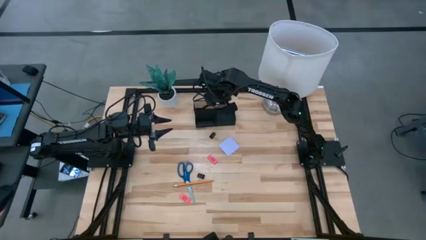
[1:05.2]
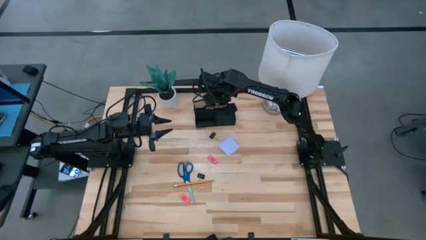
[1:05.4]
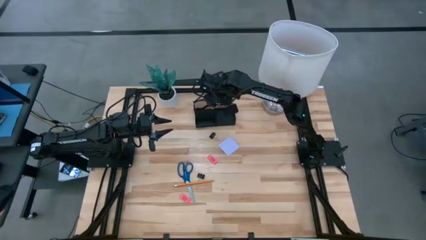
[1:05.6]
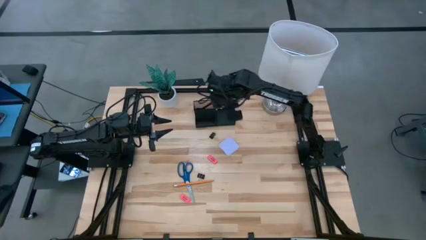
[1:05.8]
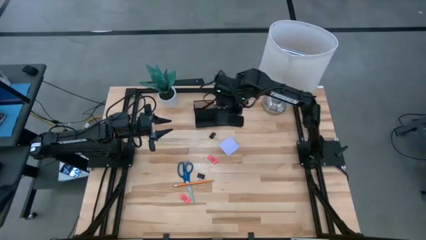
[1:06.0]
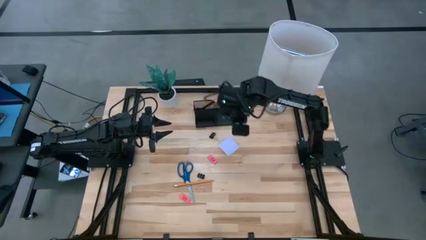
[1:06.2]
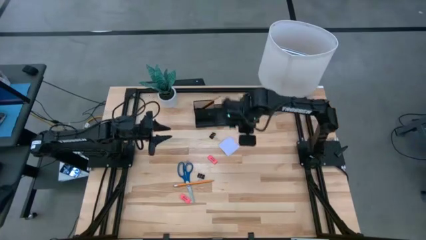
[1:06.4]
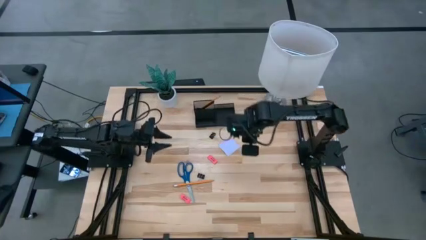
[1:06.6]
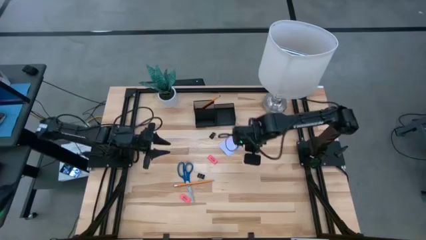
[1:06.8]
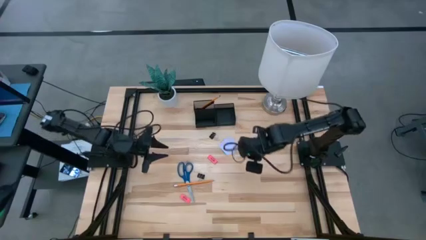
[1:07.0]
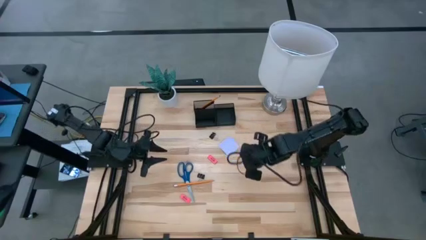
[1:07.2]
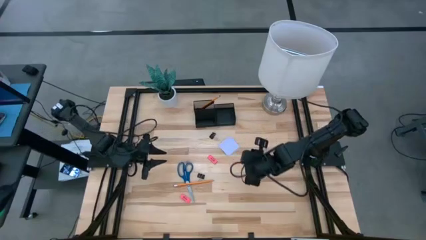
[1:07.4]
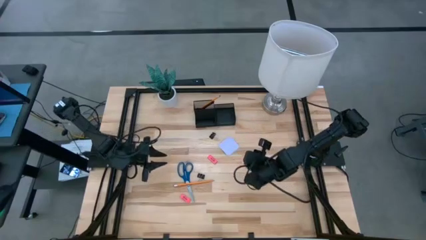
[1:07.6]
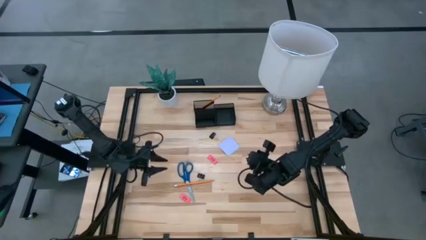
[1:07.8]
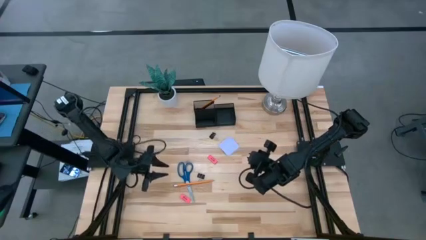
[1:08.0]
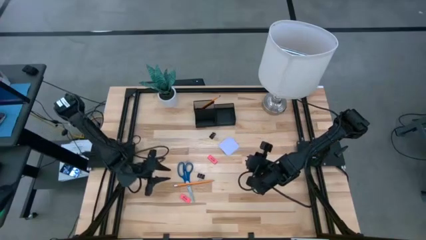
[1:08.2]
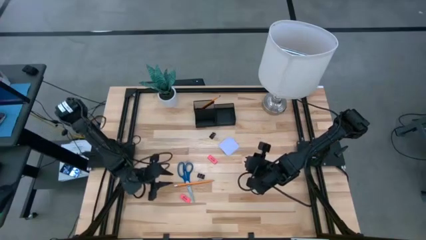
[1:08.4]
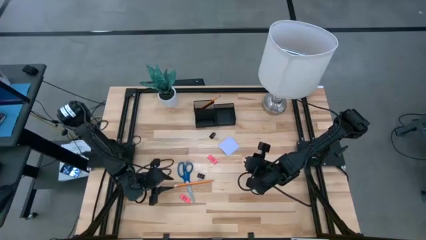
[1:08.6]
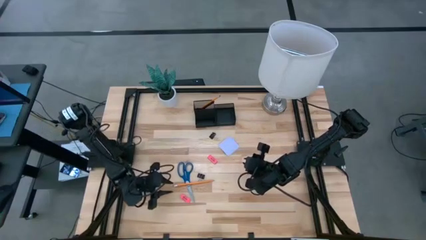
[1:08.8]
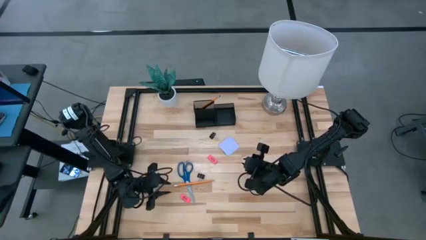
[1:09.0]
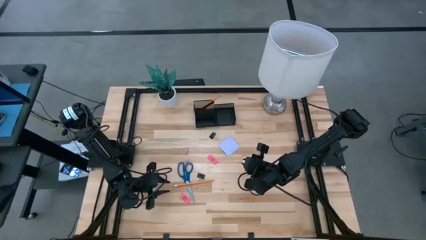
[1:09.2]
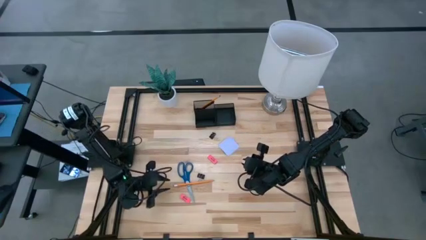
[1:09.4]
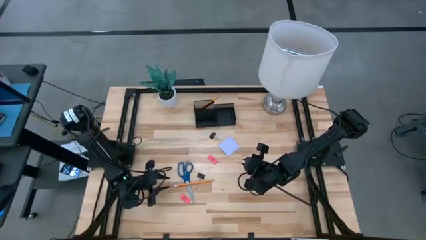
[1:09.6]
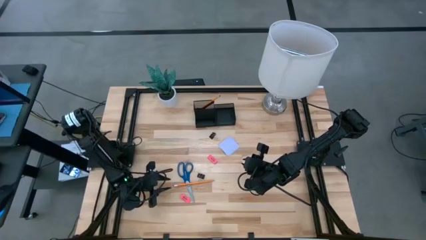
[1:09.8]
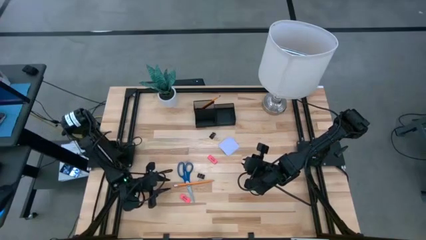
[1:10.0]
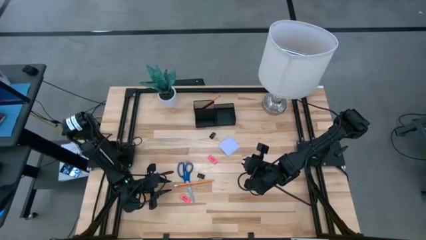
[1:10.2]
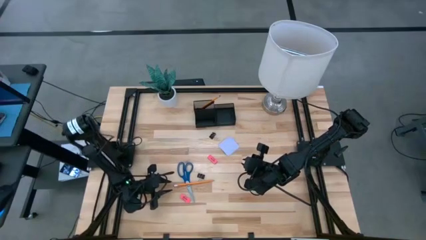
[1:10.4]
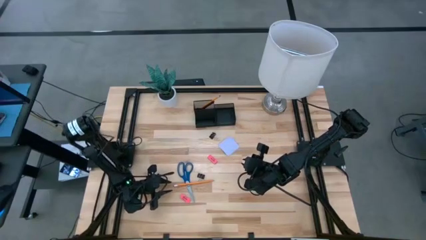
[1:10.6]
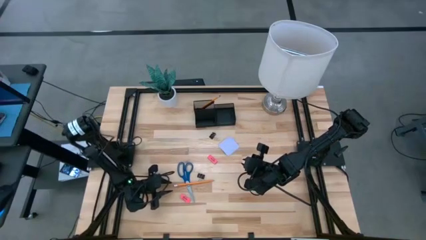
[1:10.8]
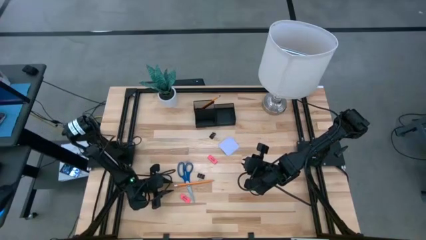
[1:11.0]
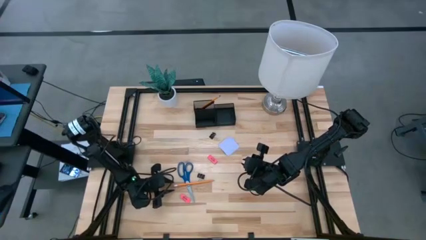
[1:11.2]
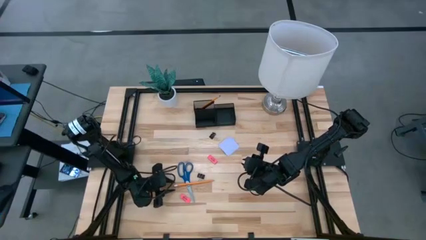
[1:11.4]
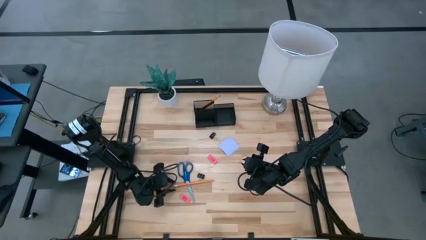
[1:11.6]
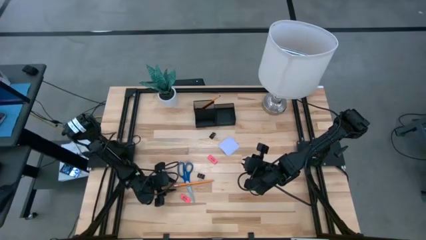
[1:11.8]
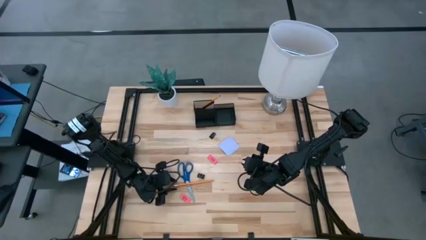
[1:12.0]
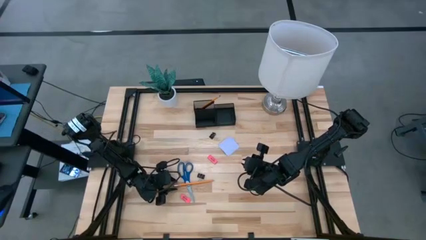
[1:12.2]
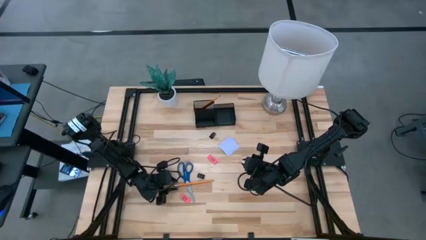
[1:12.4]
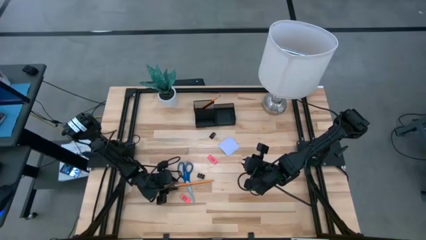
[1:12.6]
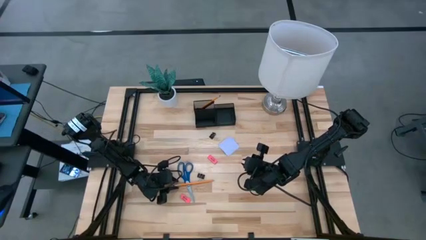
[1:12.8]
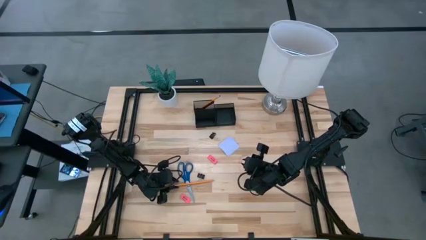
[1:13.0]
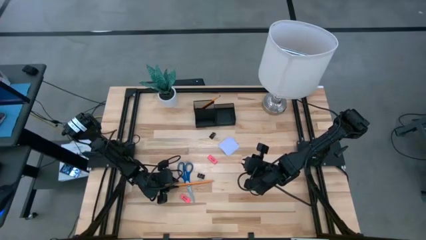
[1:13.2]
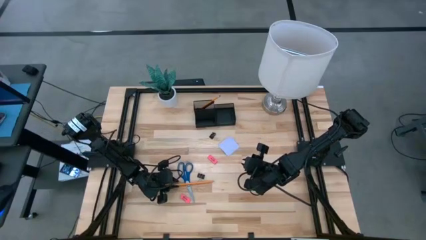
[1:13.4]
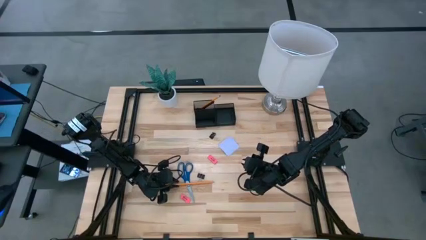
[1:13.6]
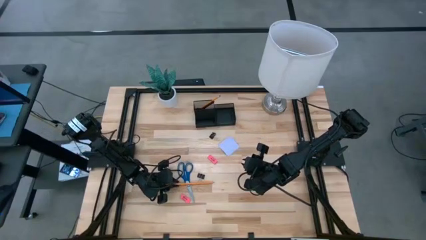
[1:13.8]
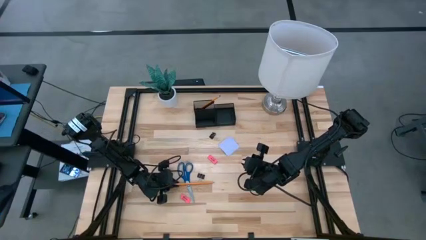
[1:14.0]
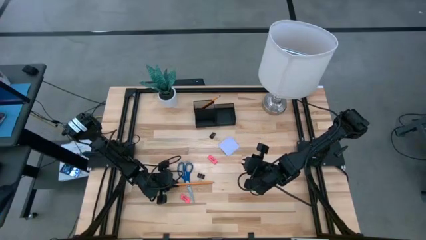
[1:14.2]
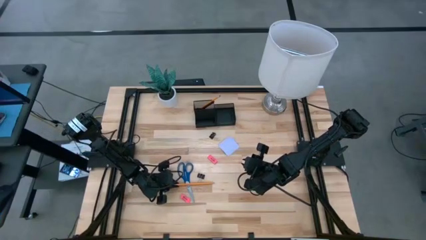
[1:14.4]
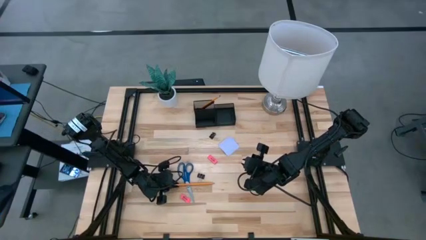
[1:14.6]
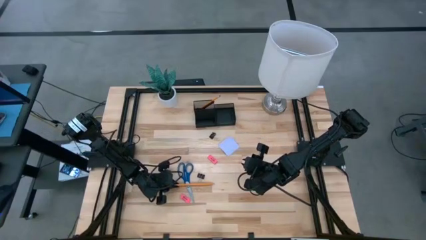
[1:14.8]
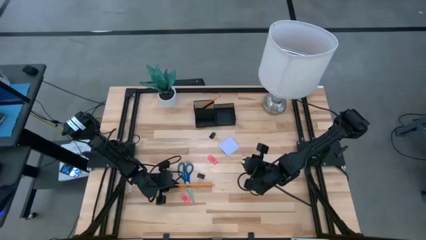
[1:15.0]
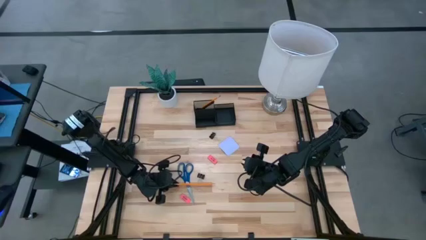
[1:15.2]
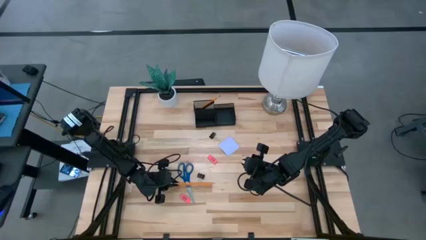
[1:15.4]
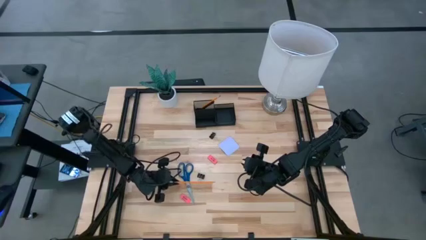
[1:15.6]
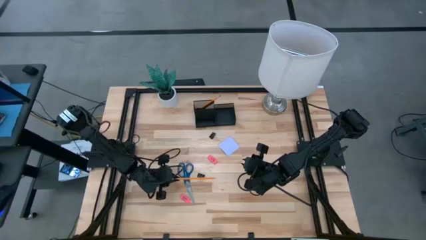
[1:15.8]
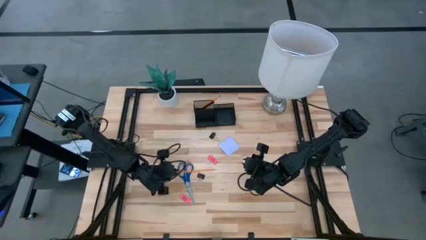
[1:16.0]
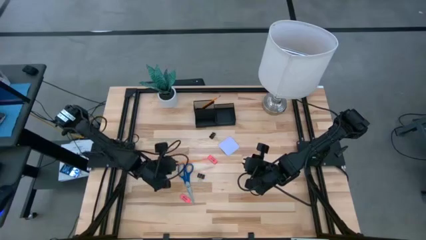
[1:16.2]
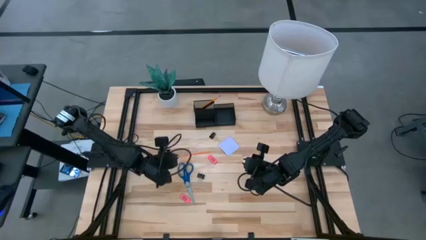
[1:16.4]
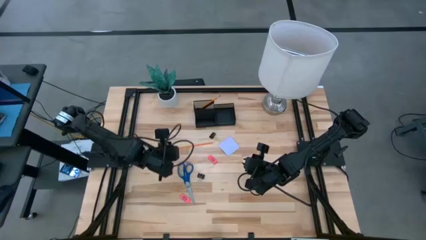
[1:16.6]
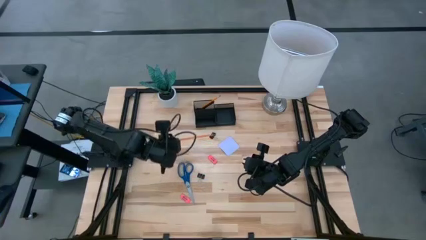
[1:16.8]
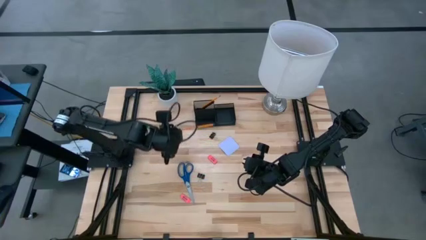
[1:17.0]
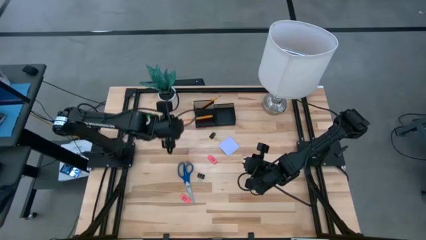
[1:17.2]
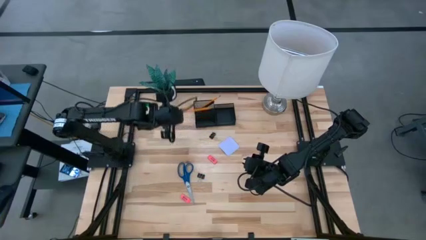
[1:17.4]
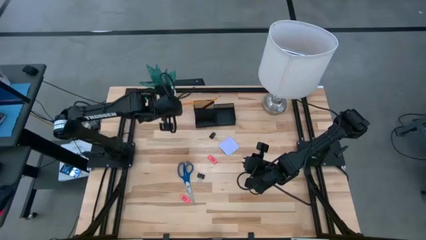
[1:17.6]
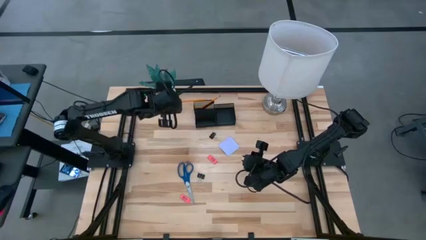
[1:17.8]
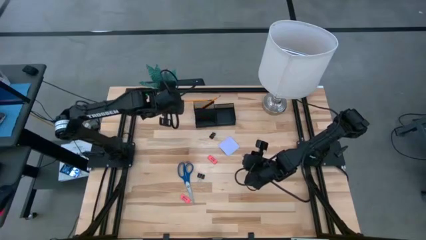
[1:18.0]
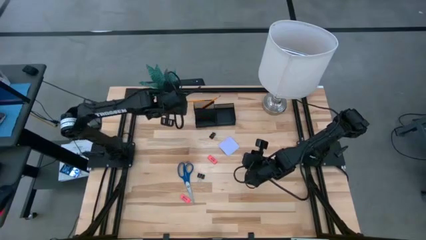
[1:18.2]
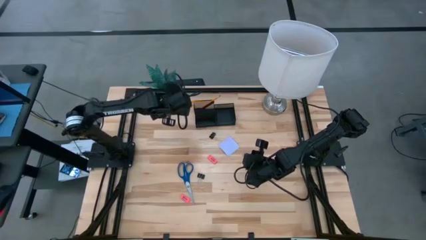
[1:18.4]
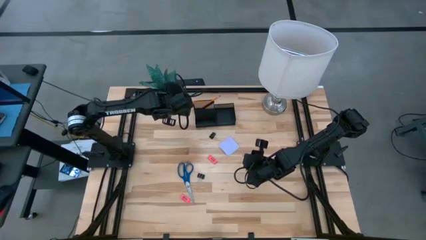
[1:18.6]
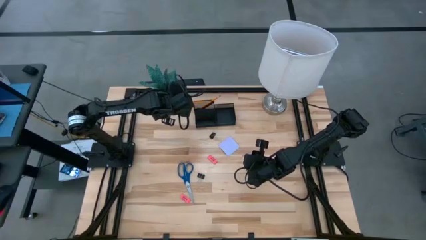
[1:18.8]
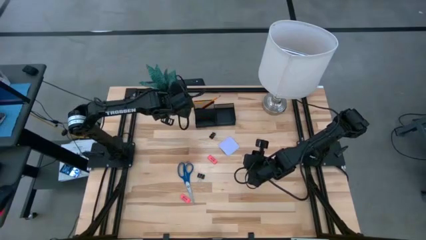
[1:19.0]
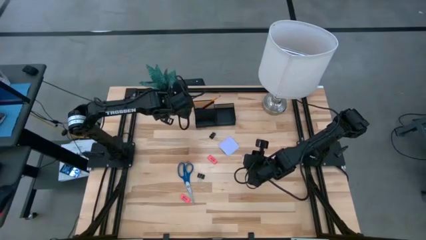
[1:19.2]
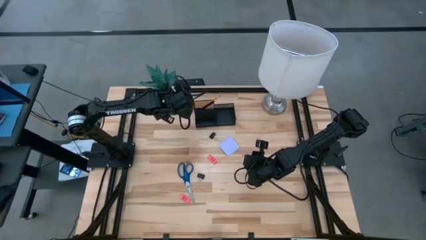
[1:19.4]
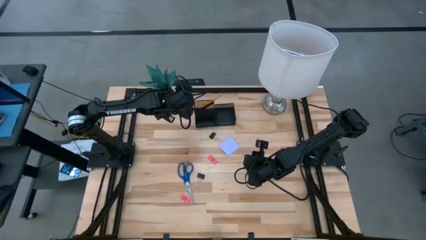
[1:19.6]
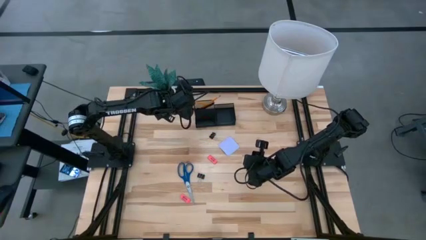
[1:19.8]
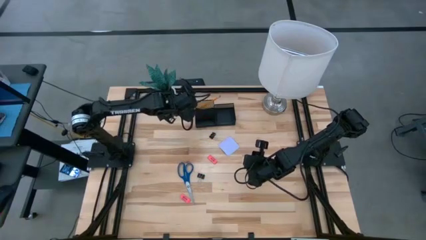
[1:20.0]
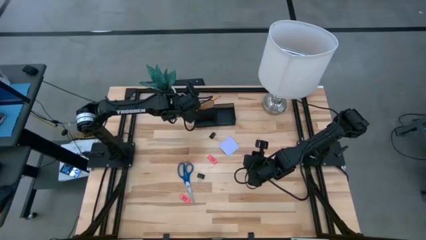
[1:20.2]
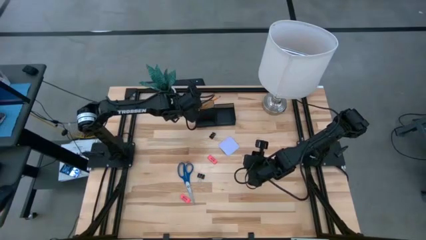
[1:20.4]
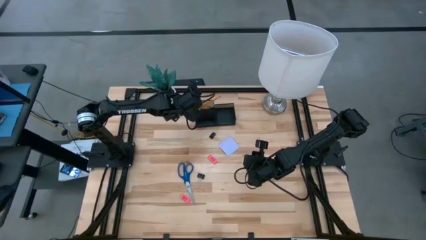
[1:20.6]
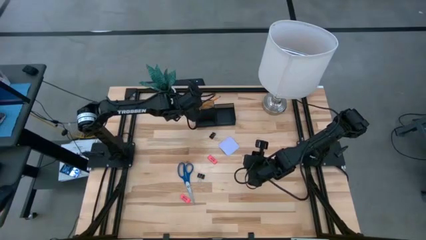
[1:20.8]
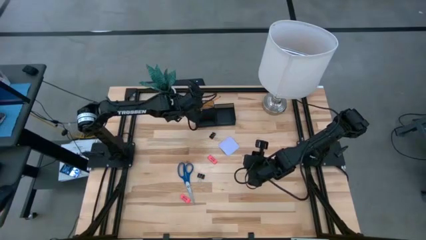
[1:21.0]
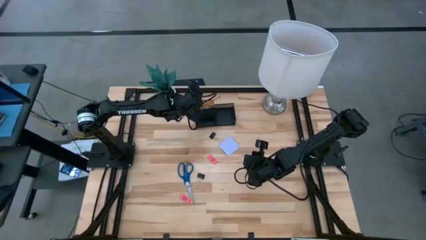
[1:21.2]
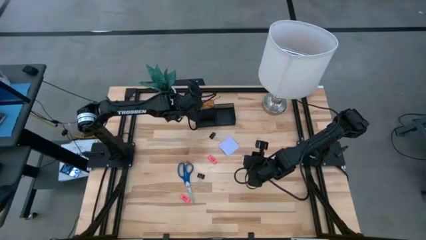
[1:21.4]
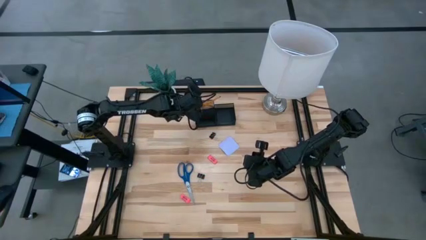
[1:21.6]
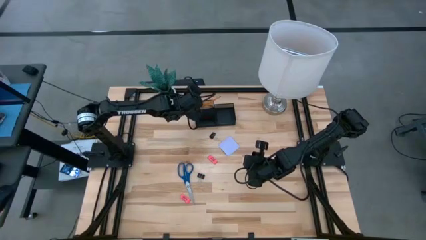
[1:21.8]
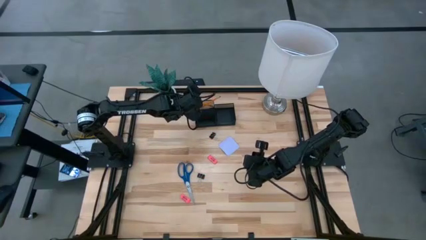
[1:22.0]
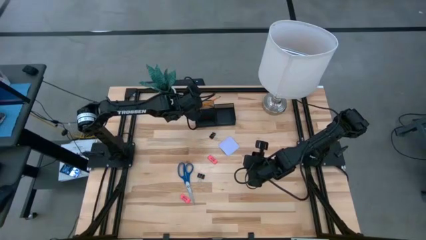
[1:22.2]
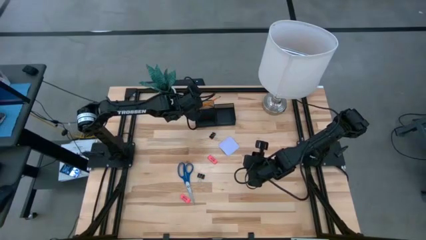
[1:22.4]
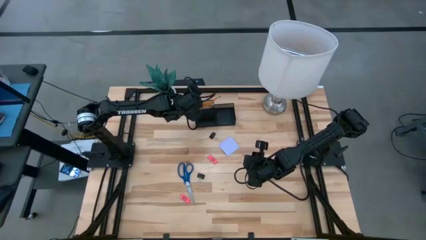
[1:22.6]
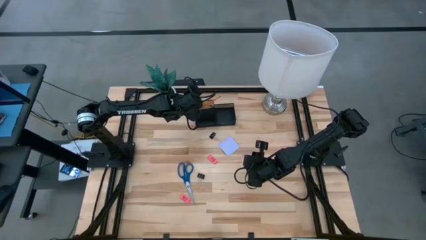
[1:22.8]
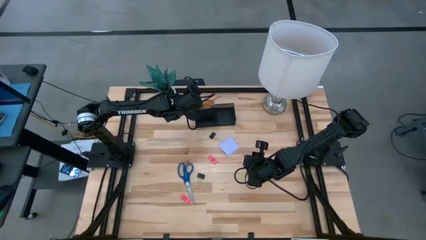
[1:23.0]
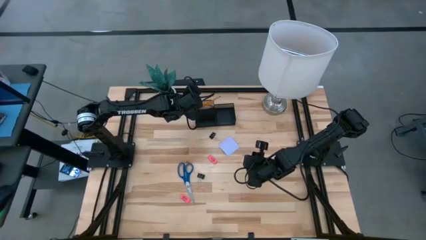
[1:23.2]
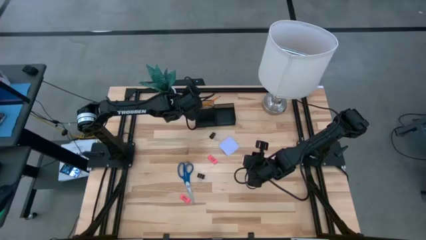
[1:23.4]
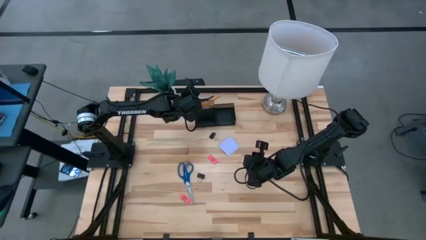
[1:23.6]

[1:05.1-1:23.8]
Task: Pick and place office supplies into organizer
Put the yellow pencil into the black desk organizer
